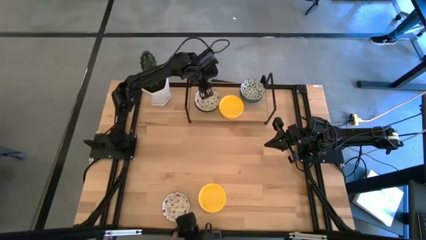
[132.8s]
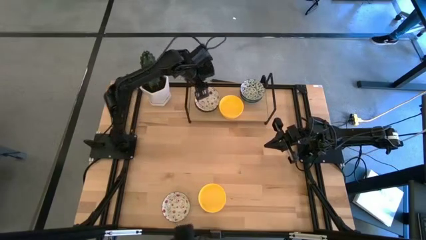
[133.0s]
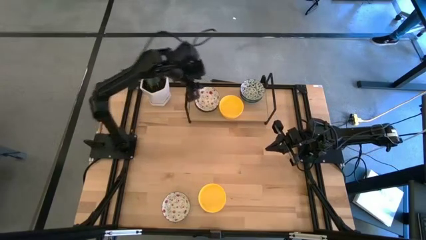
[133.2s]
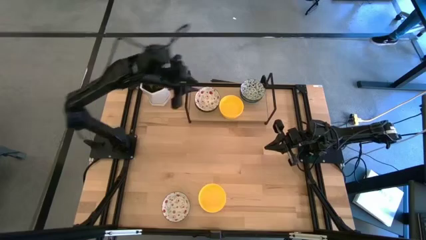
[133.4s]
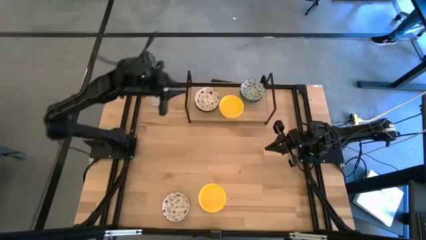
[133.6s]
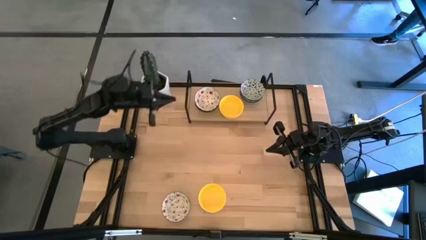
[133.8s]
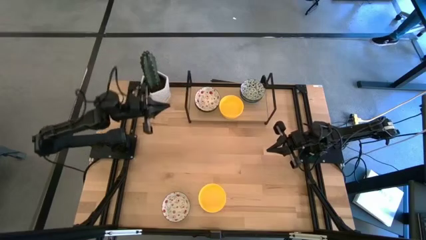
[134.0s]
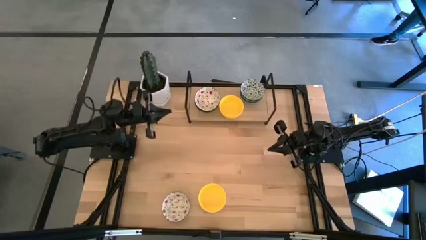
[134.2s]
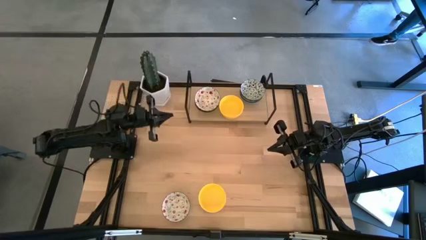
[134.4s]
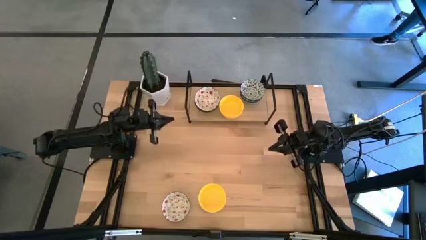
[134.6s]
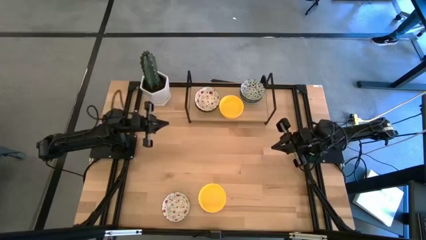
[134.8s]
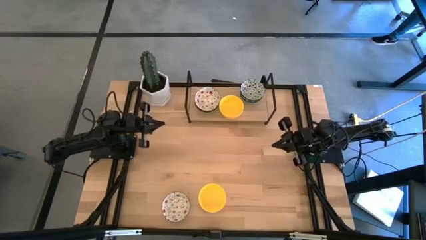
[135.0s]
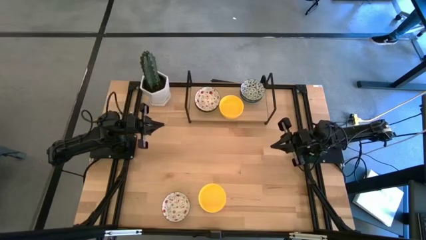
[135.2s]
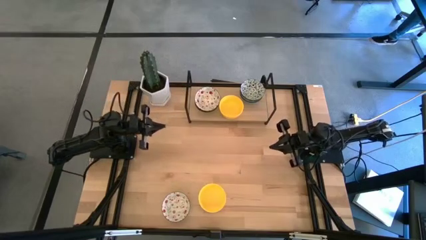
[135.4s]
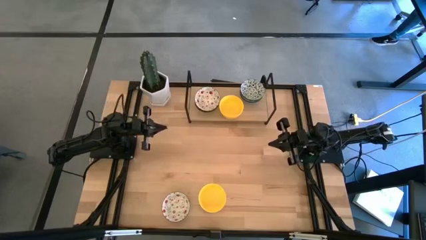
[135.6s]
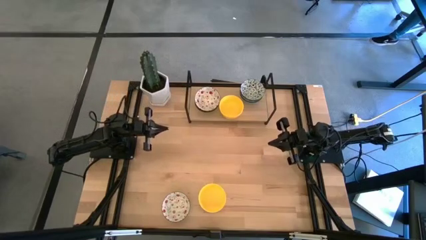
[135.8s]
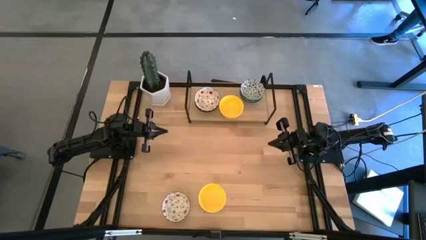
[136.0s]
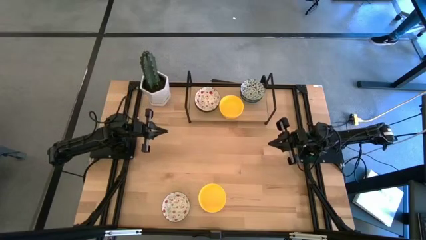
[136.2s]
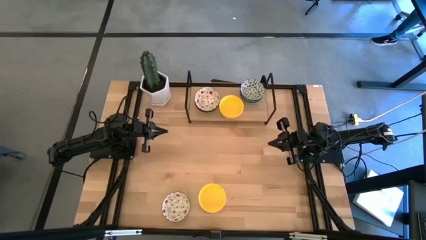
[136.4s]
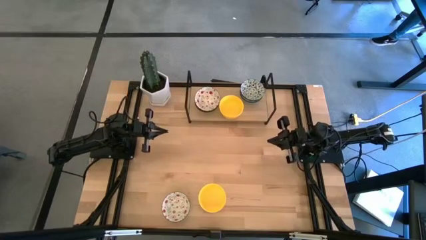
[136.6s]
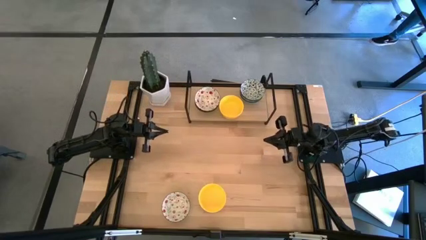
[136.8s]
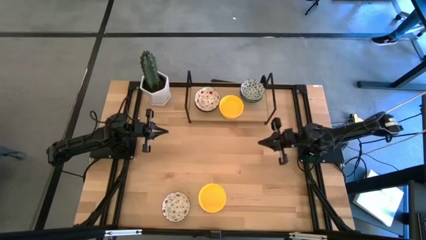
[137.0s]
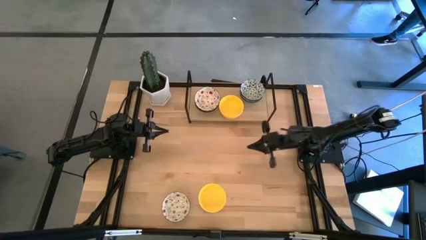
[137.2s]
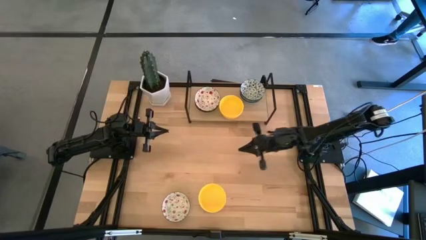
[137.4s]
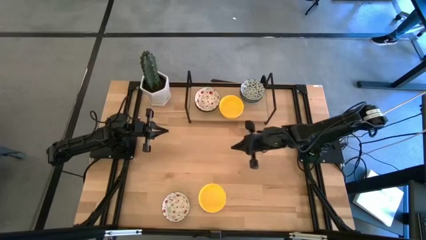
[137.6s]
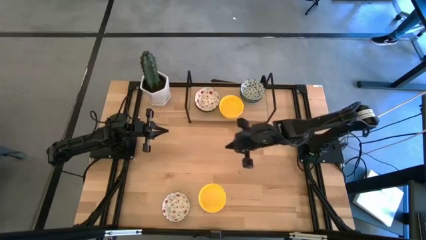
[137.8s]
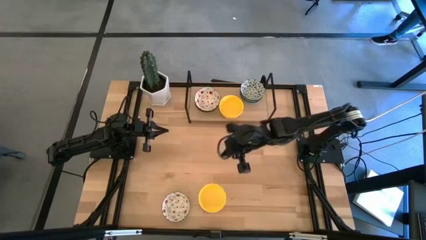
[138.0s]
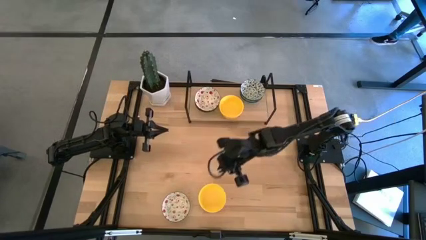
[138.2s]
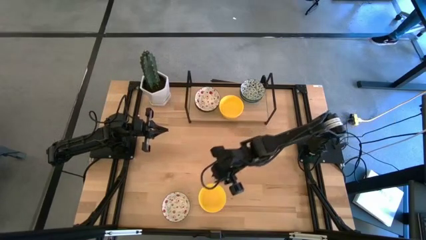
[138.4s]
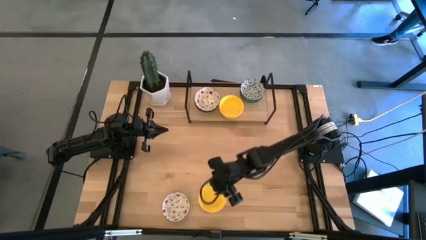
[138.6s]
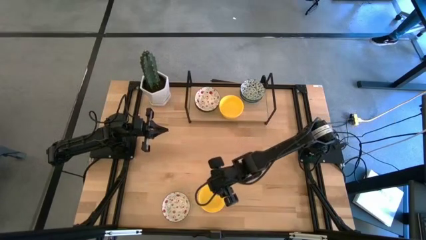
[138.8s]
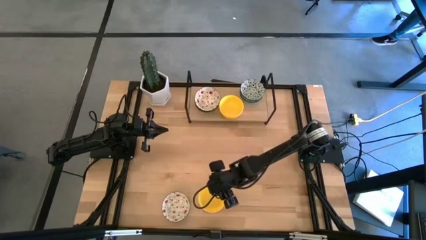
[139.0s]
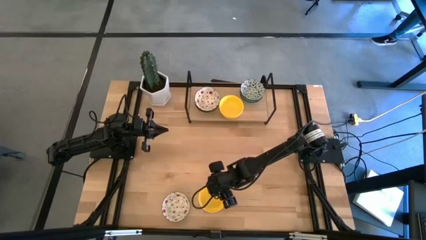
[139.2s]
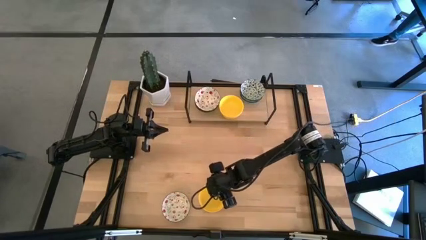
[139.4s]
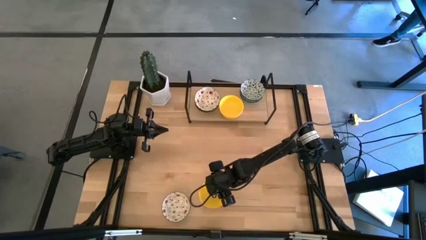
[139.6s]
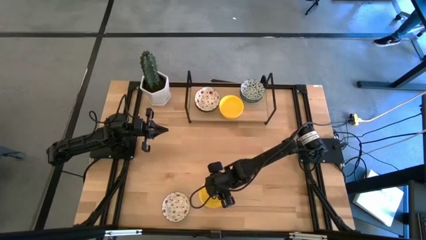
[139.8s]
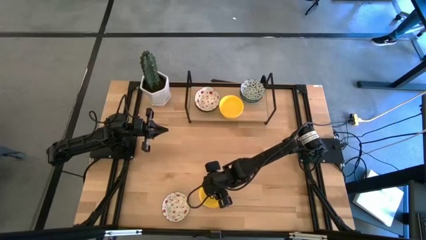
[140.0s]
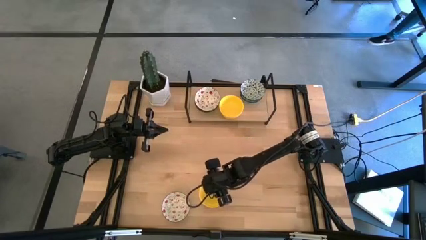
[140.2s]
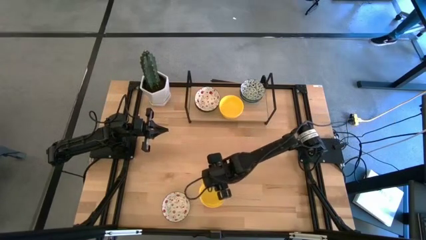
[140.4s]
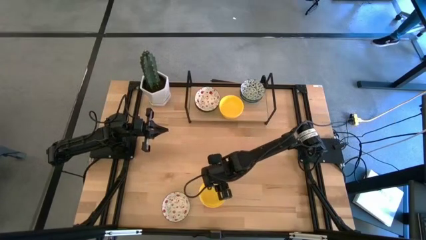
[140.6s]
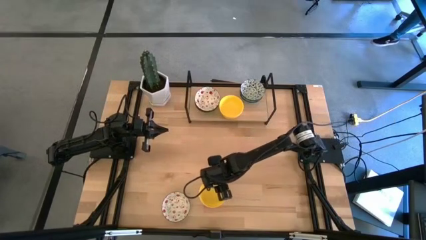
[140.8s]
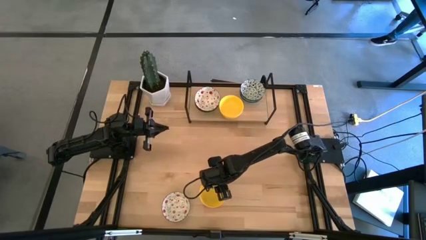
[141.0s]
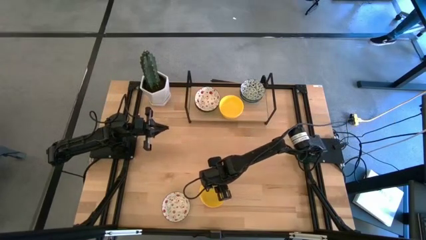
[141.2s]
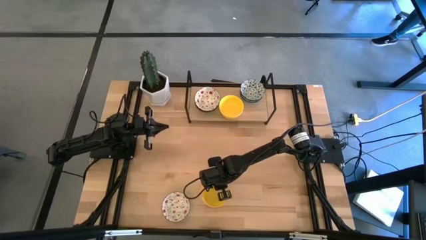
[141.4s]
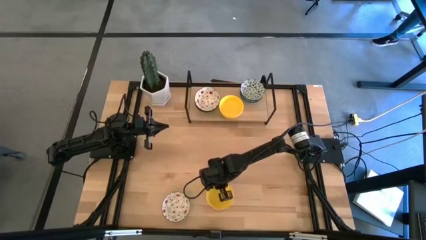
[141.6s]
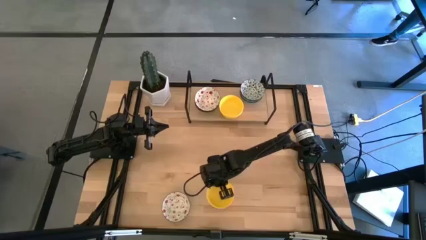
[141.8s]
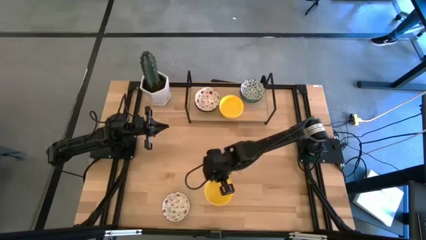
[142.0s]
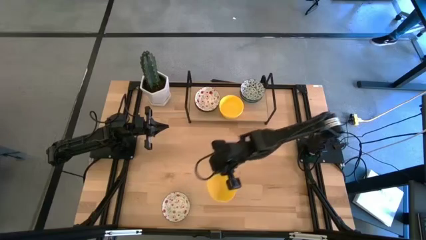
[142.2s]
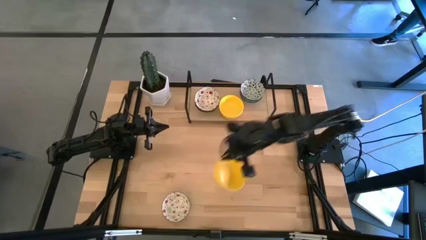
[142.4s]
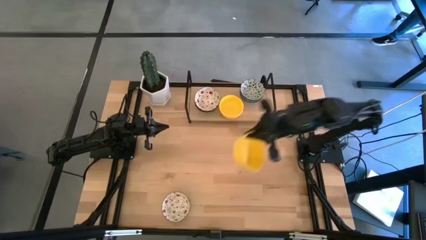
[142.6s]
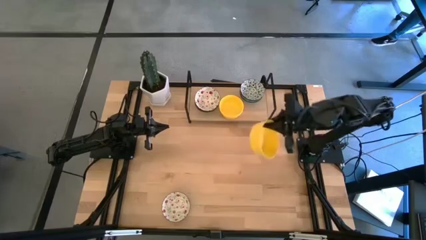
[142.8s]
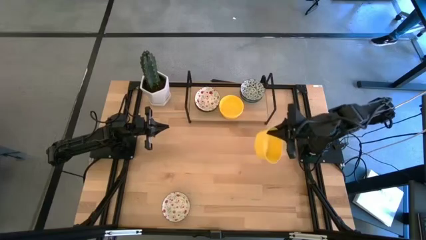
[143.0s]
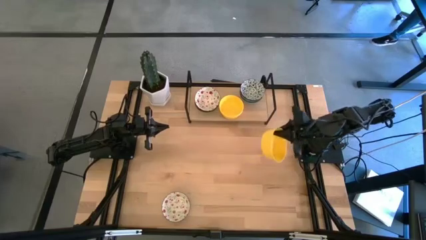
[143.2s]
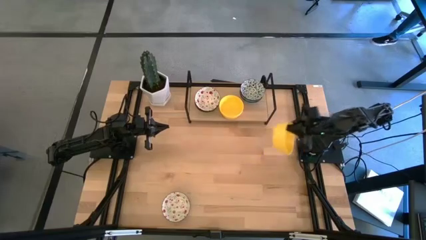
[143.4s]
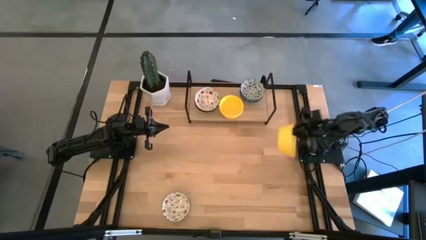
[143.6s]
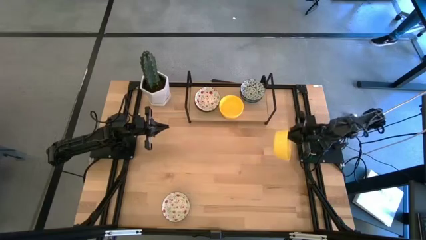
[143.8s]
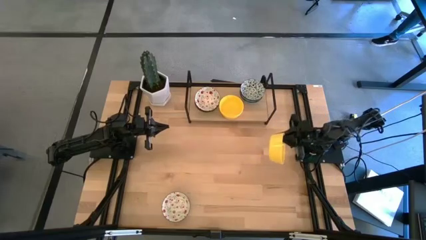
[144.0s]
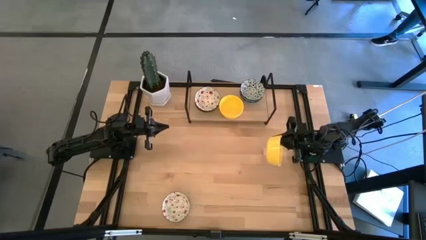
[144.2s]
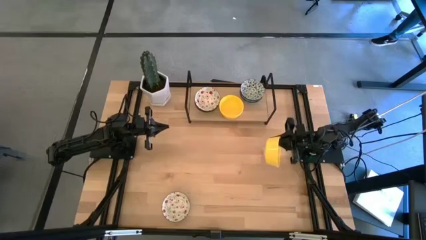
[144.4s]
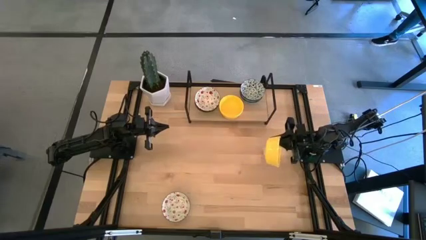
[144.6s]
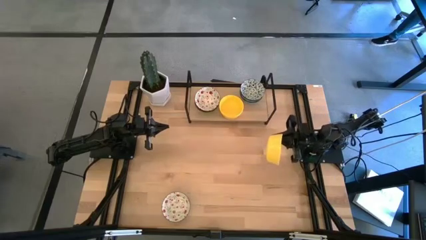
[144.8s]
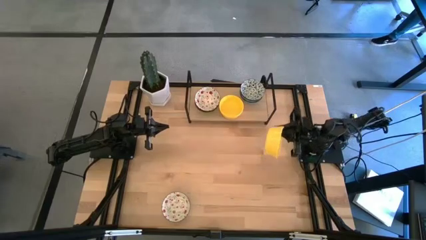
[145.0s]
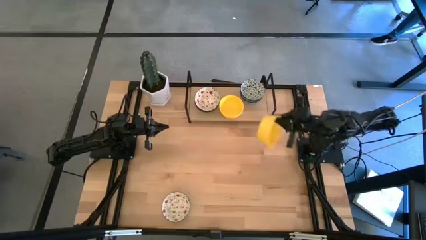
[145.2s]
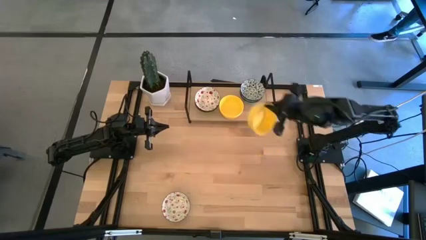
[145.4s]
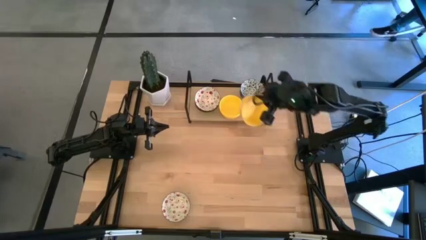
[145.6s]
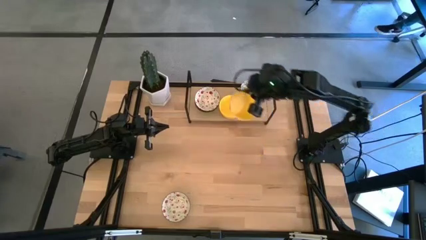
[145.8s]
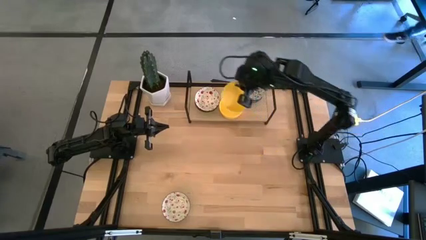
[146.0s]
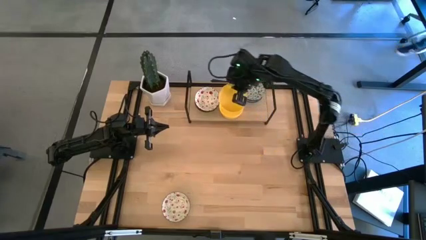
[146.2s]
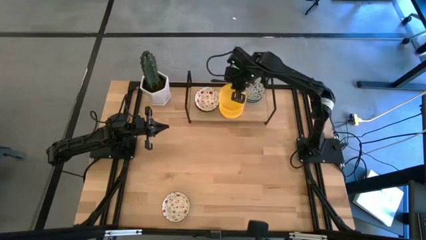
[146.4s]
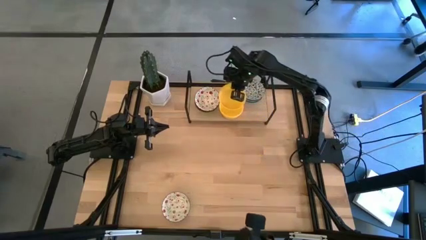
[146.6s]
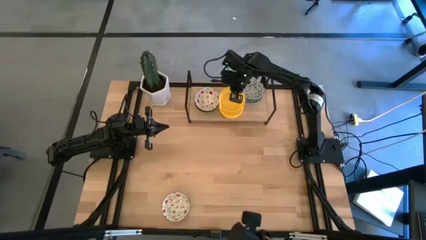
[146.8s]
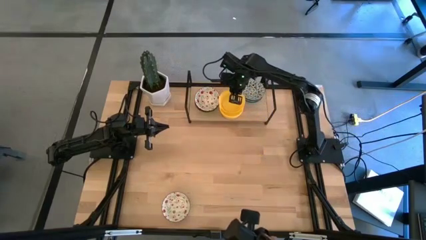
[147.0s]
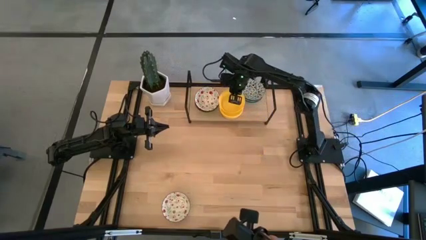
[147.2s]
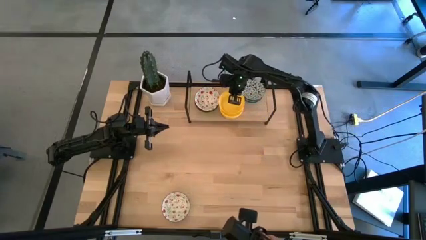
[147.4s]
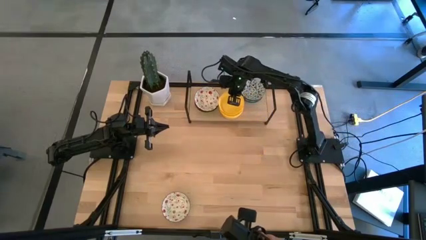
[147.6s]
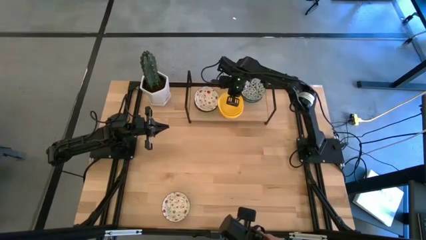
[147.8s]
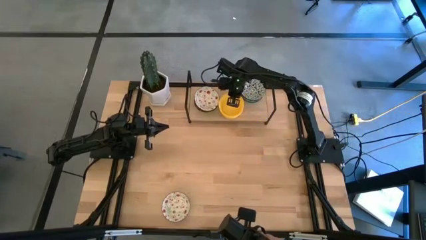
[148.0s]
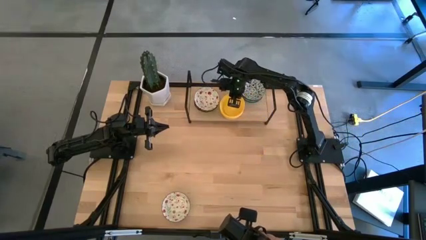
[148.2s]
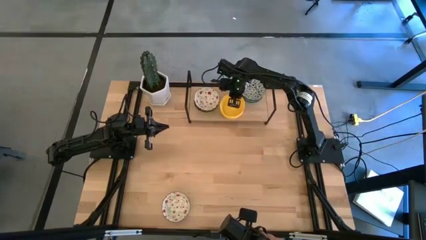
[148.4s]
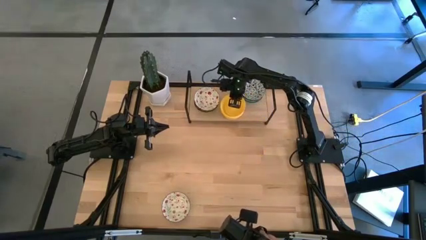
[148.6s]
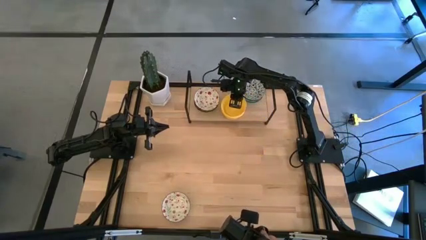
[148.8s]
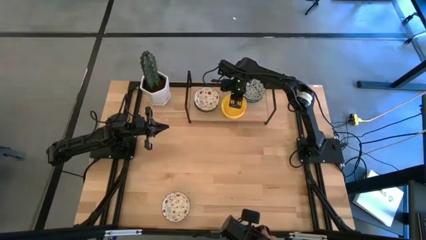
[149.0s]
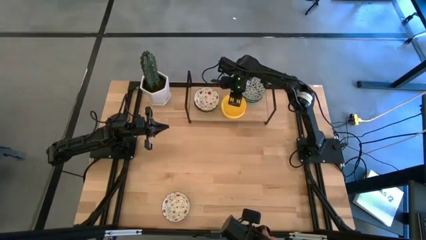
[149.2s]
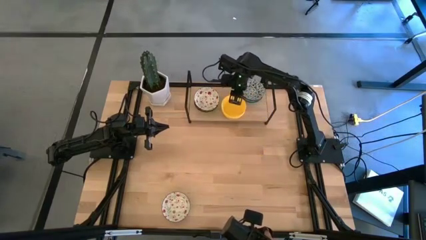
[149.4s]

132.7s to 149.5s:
Task: Pick & Place Mini bowls
Stack the yellow bowl on top of the yellow bowl on the shelf
